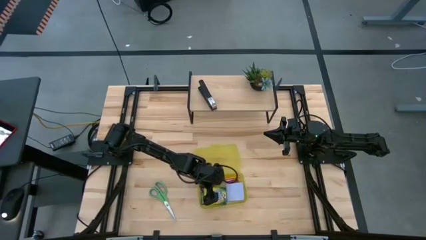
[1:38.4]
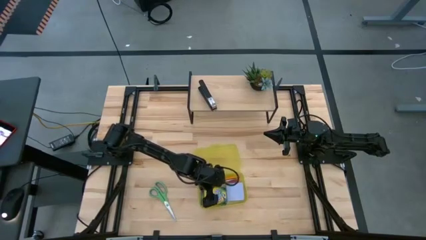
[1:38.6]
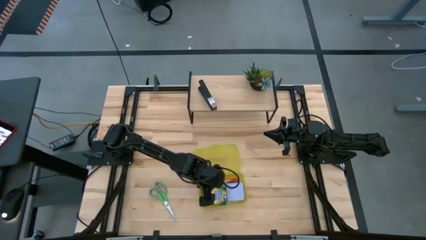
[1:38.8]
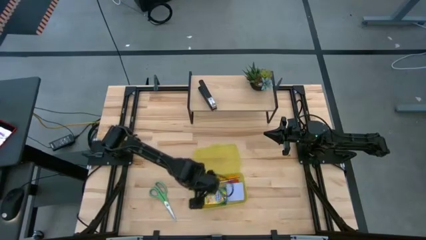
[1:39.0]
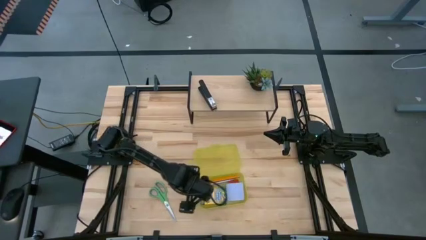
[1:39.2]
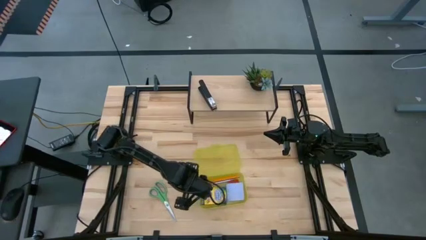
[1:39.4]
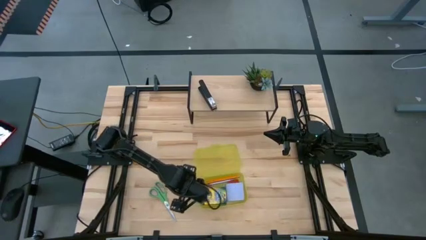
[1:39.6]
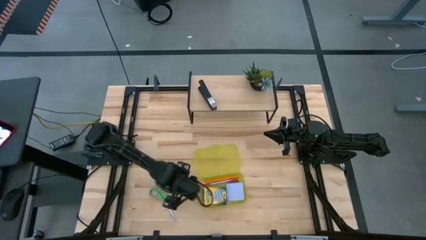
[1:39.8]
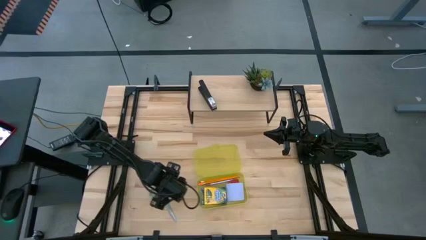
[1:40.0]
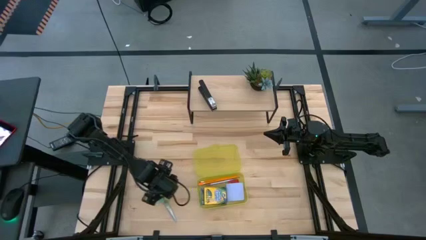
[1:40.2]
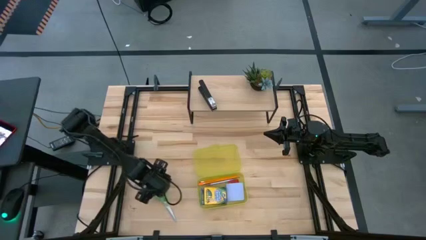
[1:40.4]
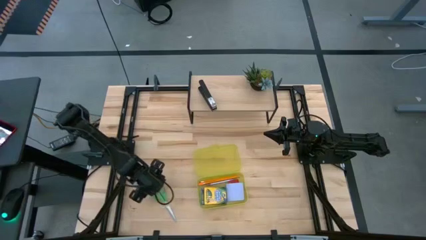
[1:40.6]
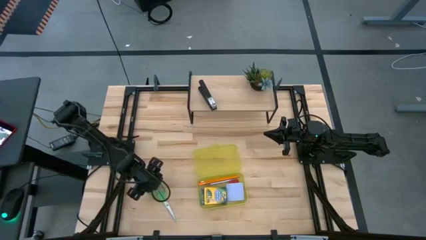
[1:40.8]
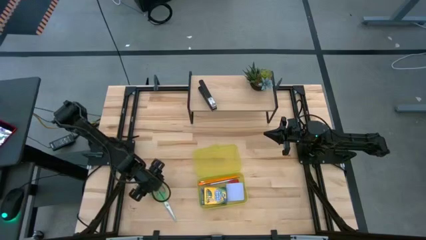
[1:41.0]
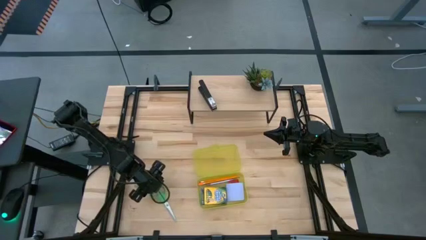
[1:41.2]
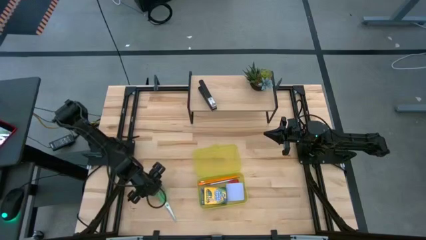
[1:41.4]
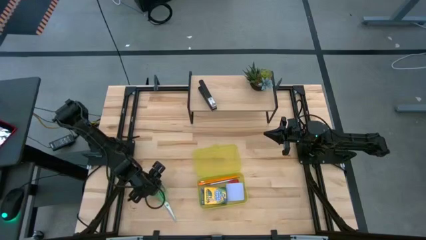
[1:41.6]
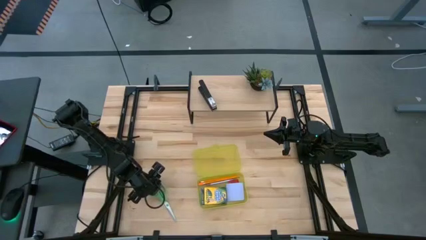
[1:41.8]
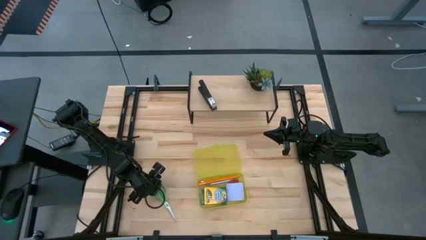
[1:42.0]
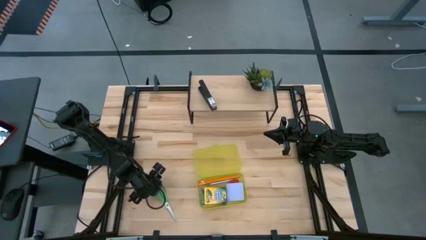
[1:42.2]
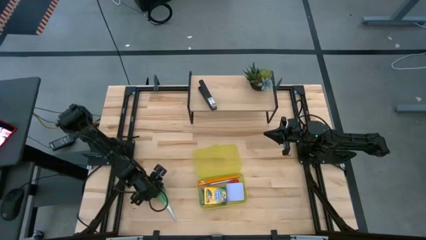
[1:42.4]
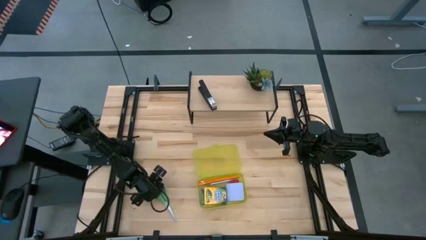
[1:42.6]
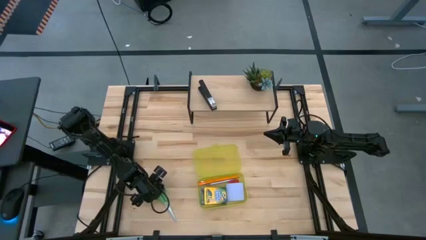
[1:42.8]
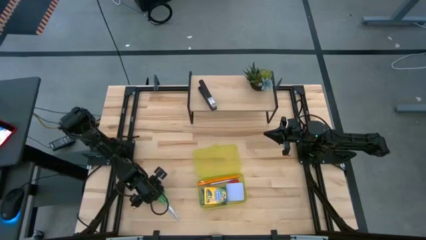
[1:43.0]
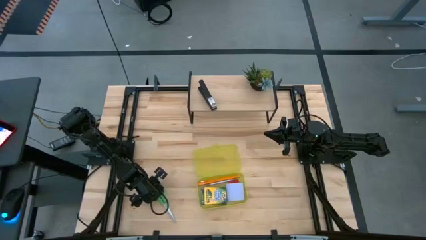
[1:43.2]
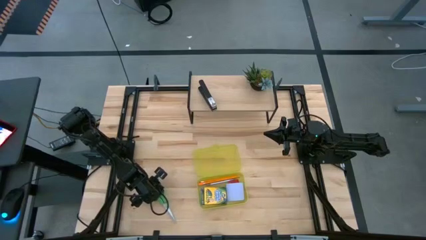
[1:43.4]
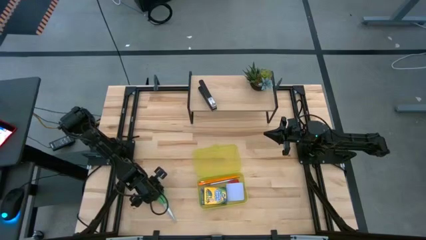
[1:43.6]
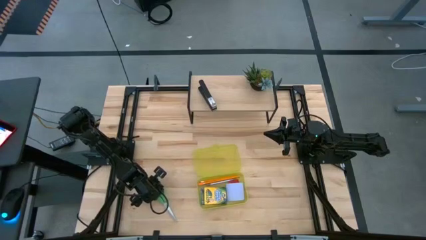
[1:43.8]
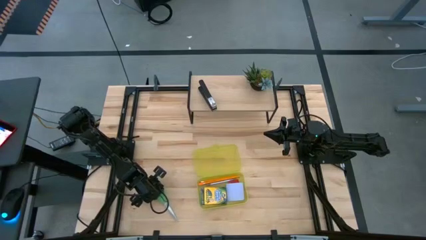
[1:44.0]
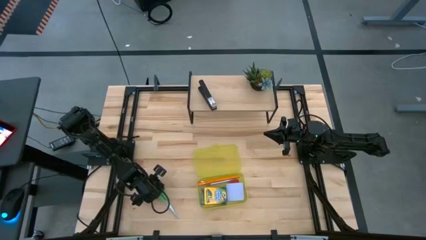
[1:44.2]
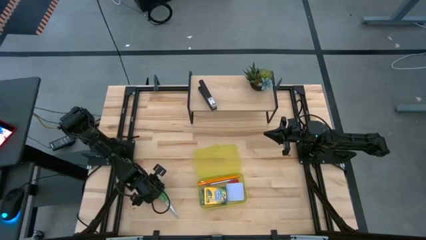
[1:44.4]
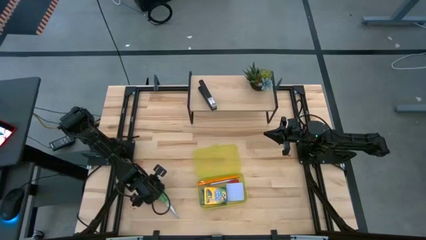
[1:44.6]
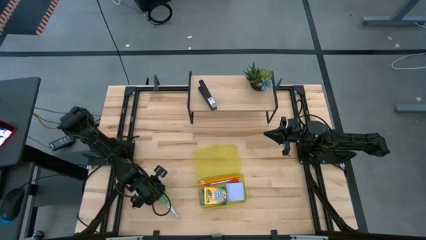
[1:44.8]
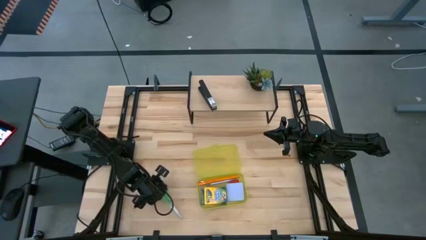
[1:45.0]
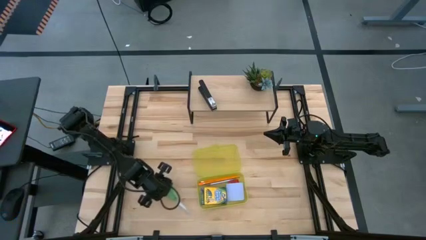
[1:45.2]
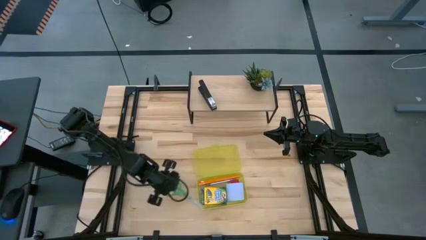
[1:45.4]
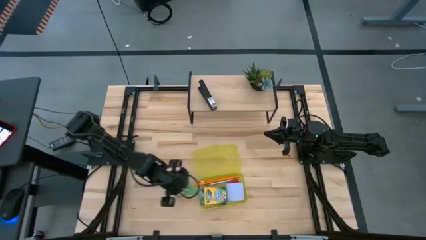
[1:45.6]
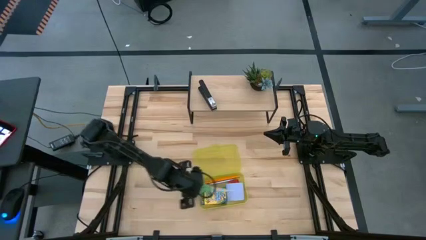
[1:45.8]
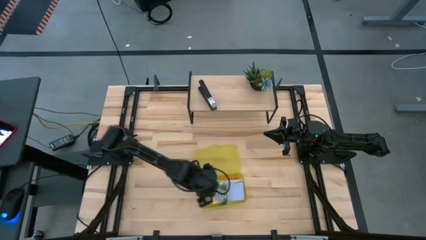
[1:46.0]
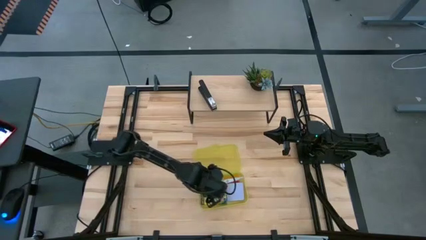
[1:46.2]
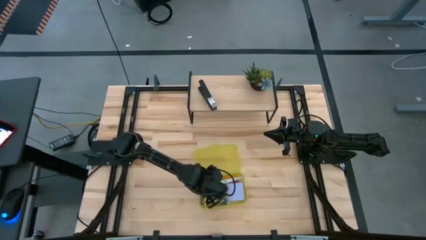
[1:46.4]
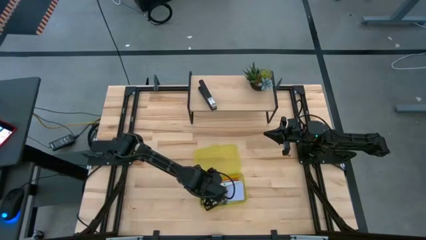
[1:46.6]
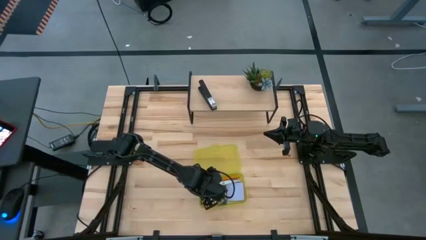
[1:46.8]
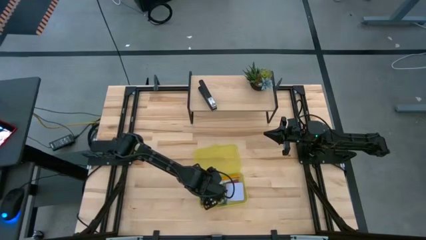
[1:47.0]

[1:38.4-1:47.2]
Task: Pack school essentials
Put the green scissors into the yellow supply box

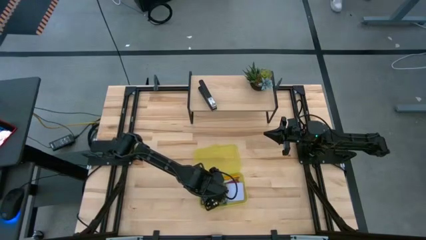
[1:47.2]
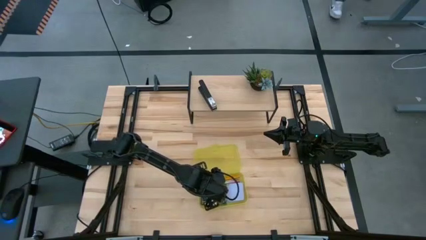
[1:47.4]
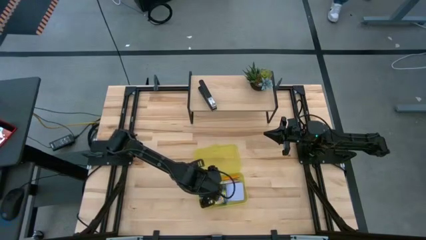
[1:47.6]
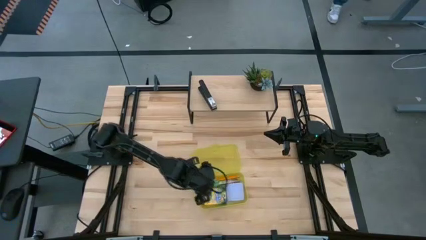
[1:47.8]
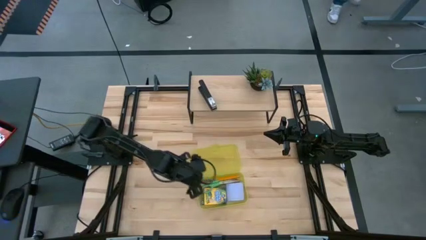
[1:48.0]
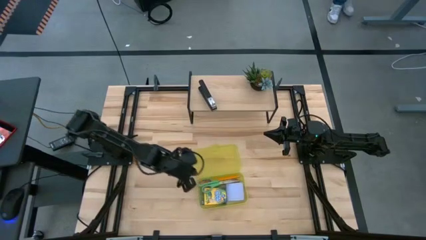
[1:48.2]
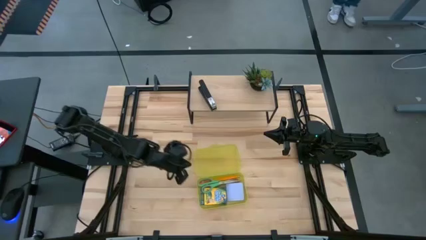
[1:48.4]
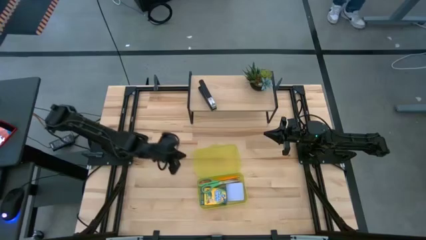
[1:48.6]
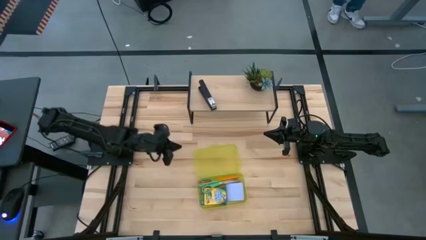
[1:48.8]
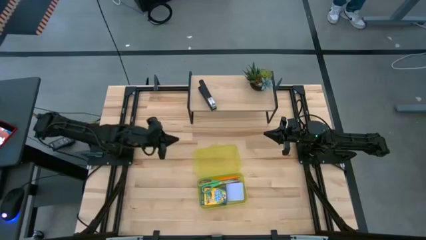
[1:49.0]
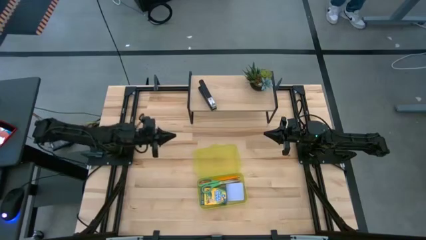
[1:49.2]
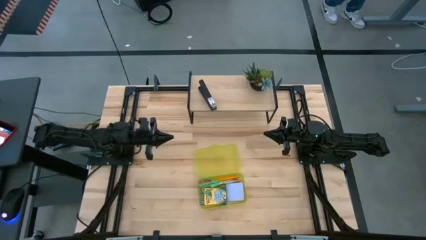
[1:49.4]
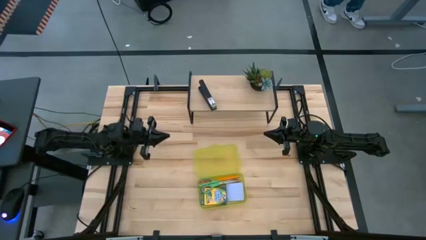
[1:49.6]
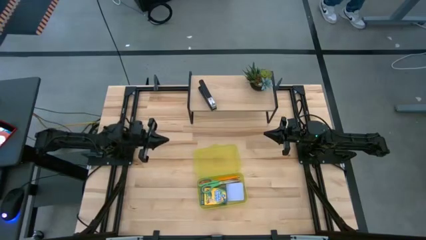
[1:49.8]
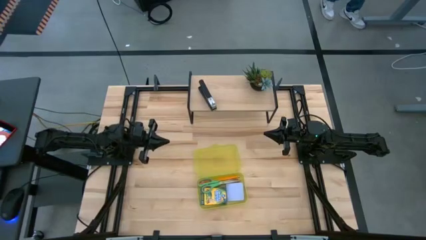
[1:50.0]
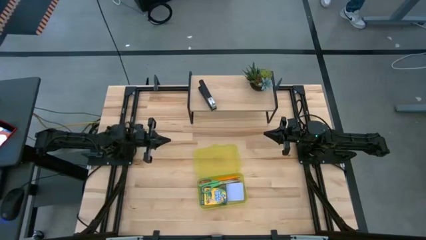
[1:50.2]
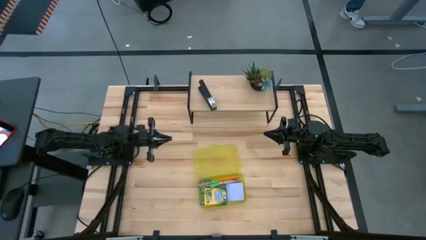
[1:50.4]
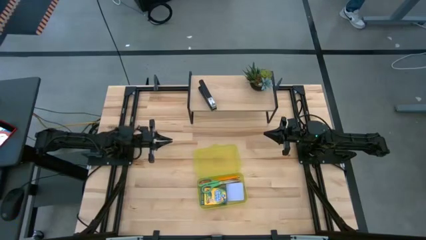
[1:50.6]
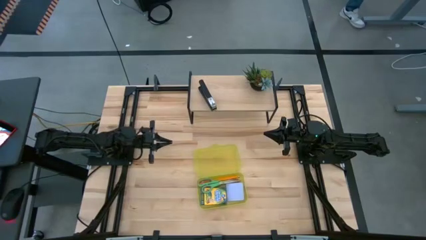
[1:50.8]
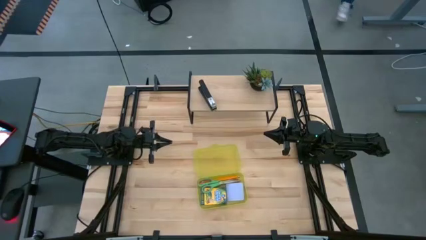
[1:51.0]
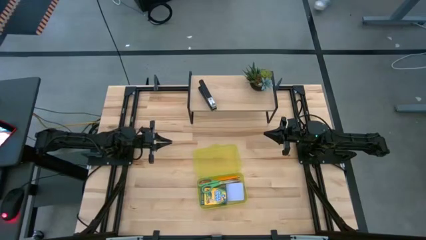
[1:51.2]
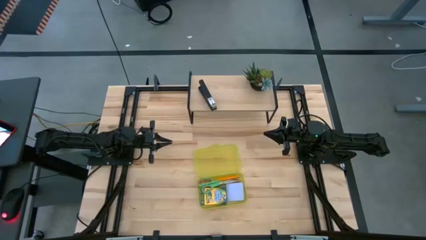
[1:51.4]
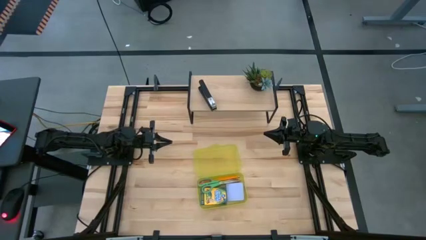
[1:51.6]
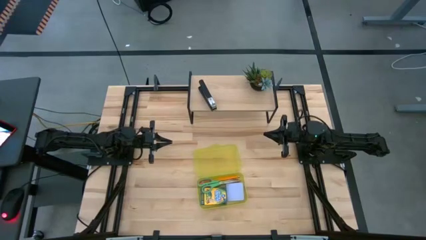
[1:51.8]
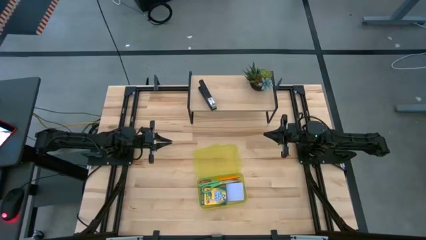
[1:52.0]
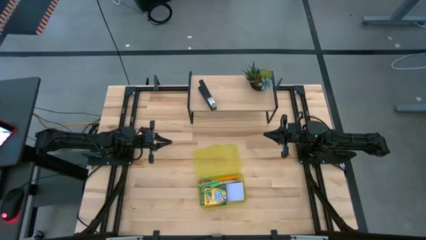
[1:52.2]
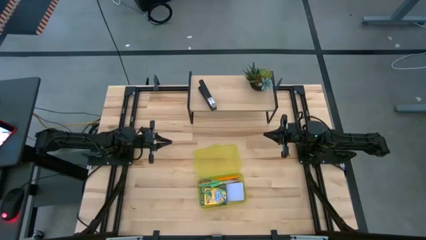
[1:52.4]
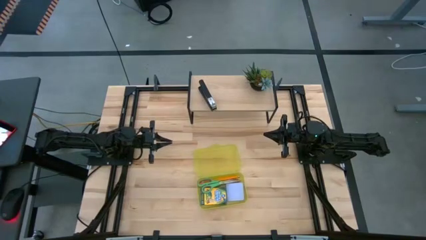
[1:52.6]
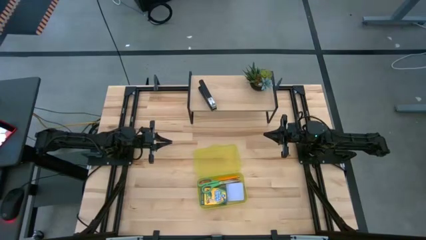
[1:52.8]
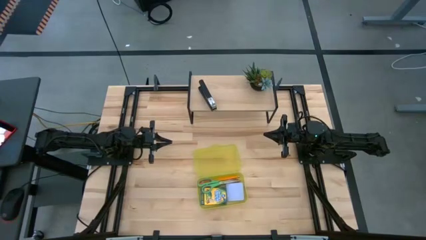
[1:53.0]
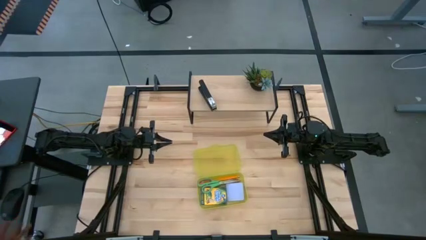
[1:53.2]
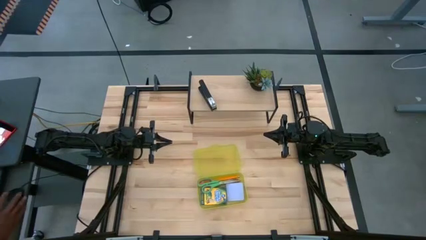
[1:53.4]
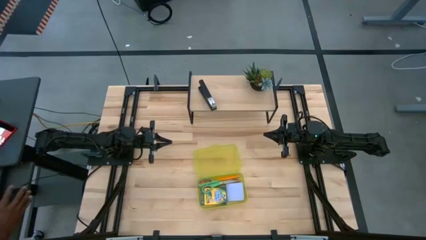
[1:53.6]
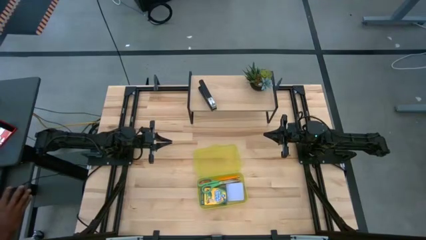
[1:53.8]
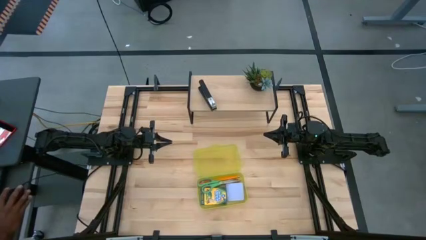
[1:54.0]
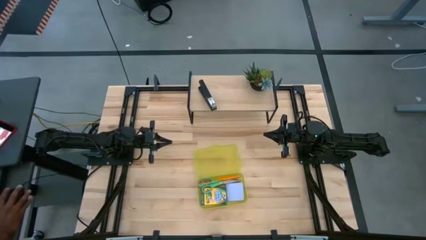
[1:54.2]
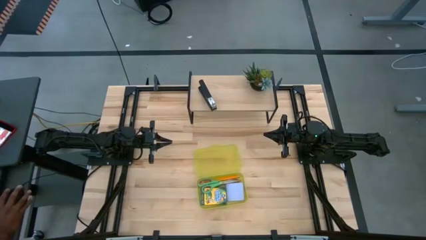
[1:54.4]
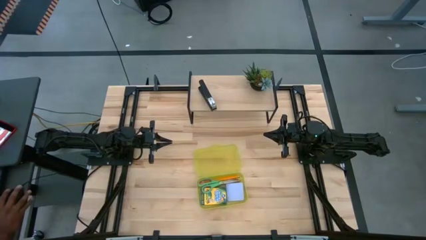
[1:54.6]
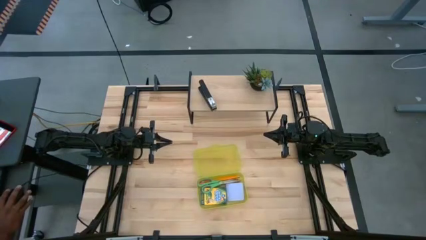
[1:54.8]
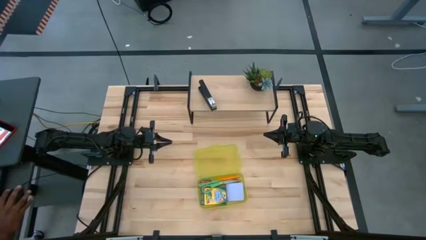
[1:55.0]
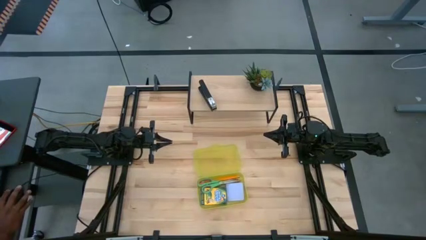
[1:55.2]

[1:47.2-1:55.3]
Return to Home Position
